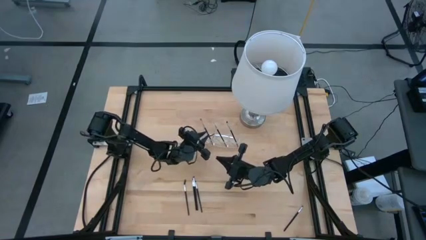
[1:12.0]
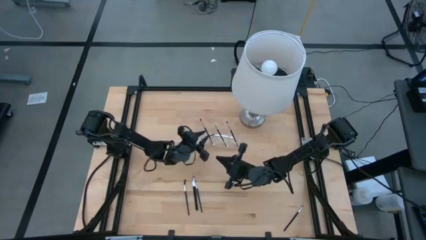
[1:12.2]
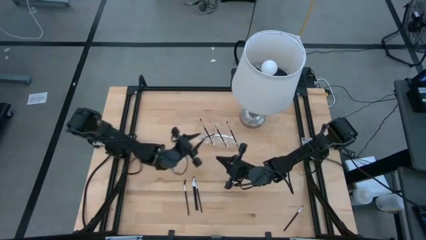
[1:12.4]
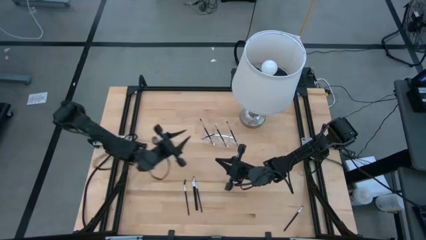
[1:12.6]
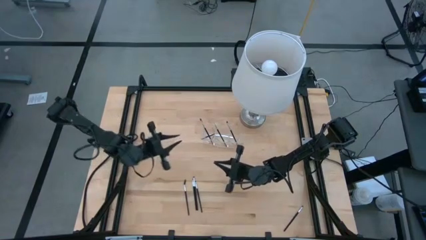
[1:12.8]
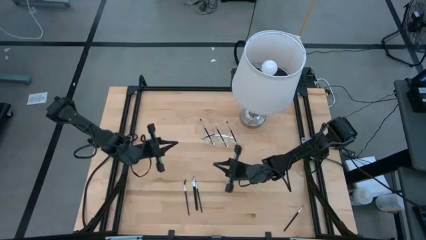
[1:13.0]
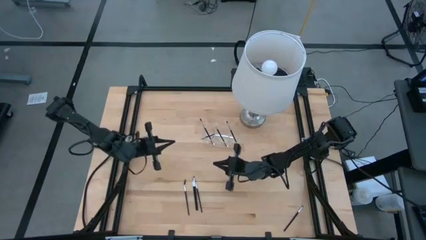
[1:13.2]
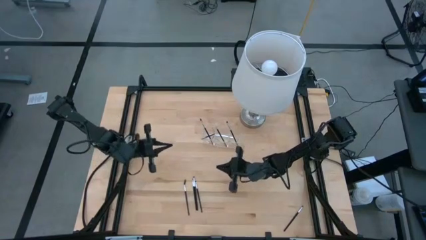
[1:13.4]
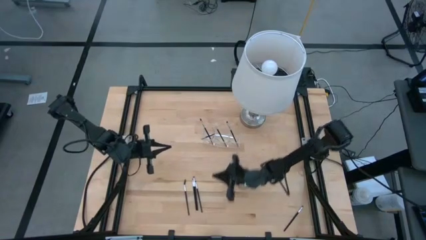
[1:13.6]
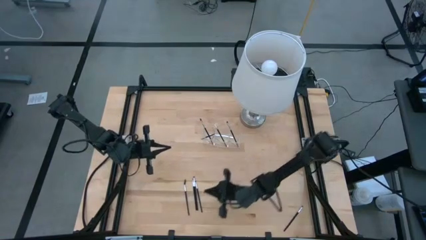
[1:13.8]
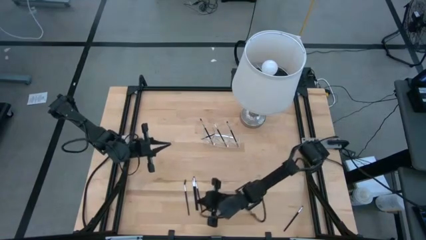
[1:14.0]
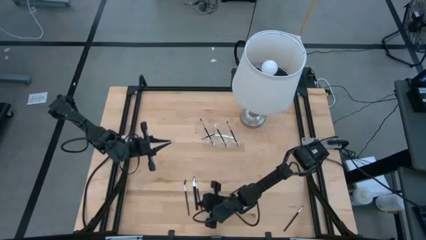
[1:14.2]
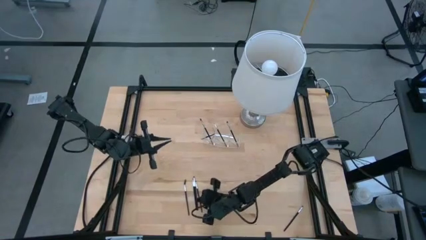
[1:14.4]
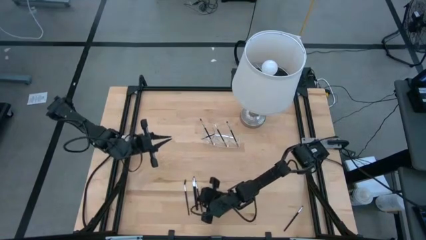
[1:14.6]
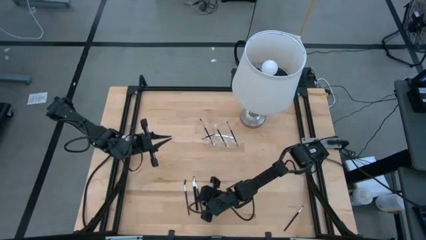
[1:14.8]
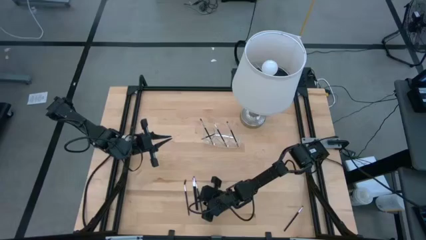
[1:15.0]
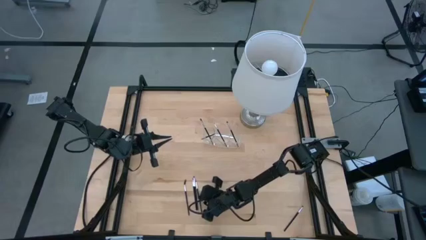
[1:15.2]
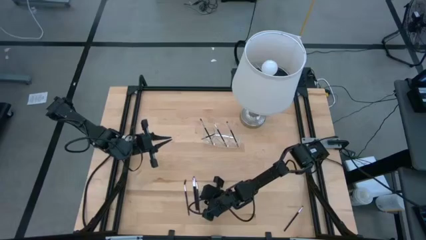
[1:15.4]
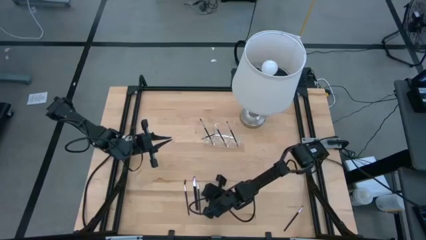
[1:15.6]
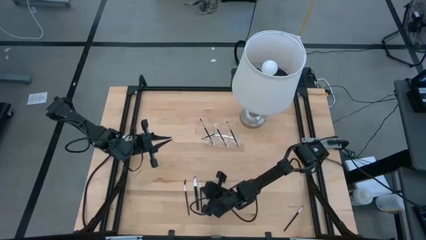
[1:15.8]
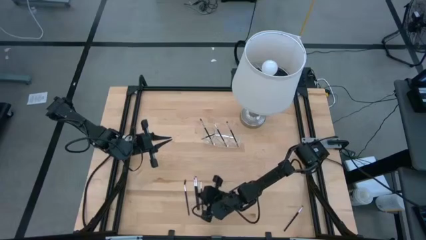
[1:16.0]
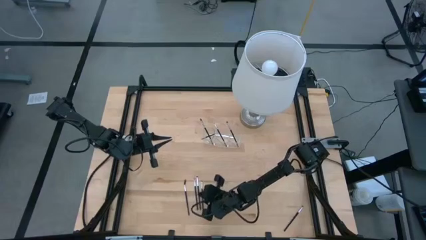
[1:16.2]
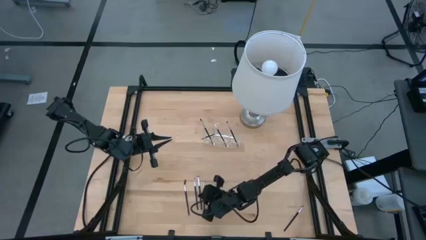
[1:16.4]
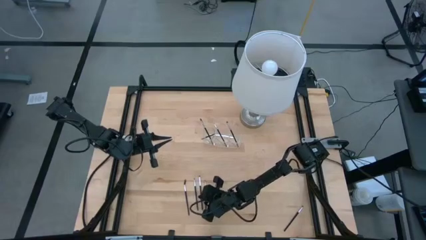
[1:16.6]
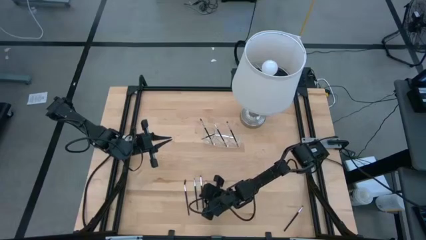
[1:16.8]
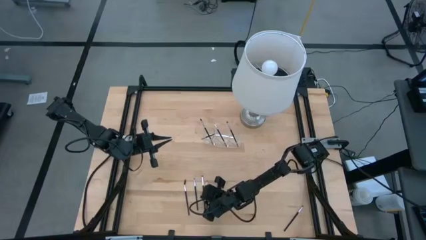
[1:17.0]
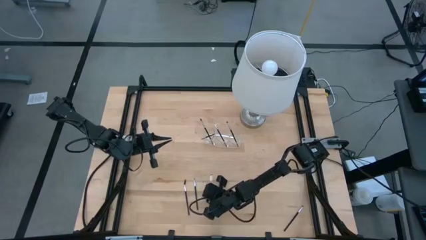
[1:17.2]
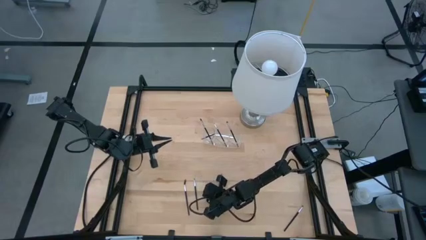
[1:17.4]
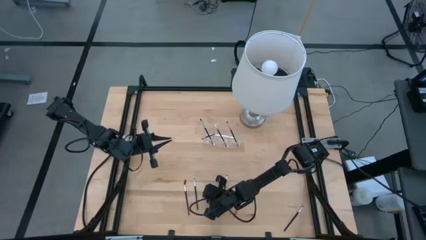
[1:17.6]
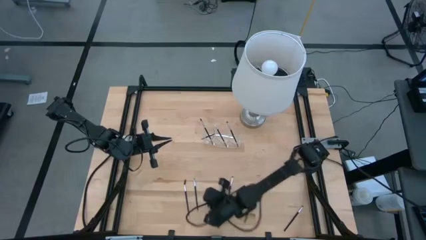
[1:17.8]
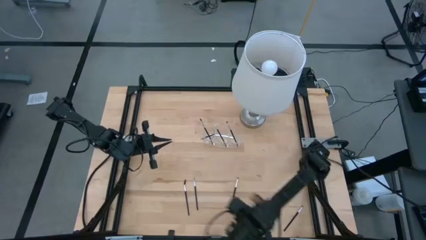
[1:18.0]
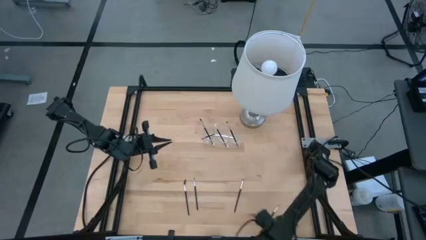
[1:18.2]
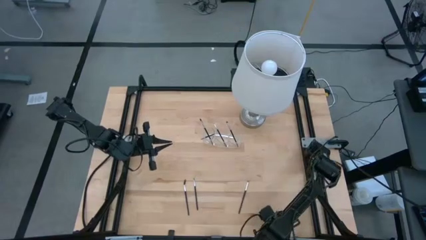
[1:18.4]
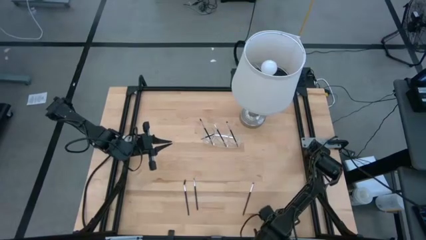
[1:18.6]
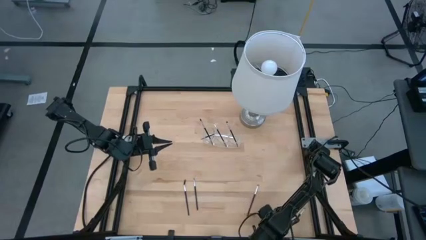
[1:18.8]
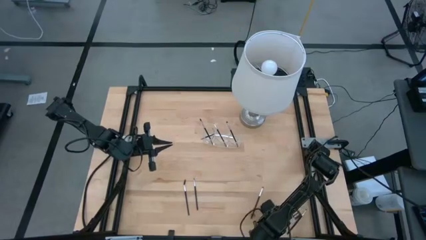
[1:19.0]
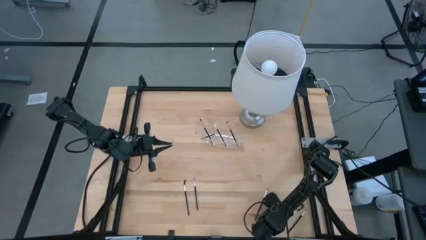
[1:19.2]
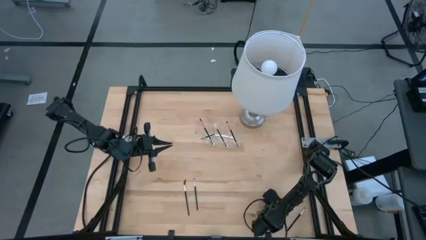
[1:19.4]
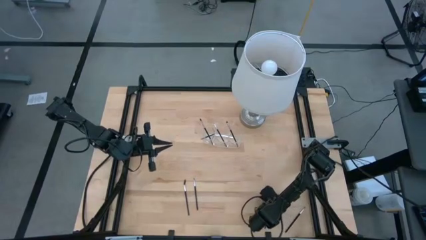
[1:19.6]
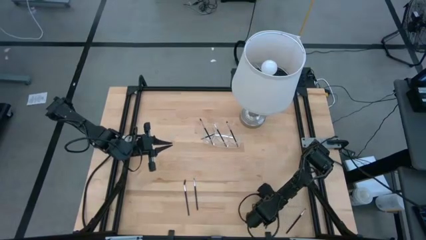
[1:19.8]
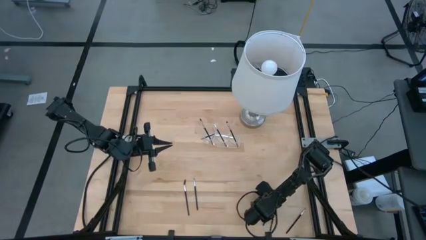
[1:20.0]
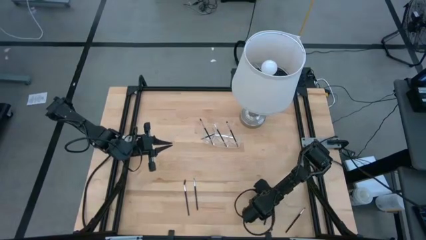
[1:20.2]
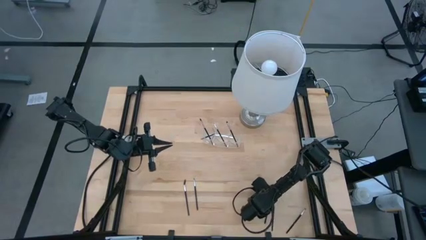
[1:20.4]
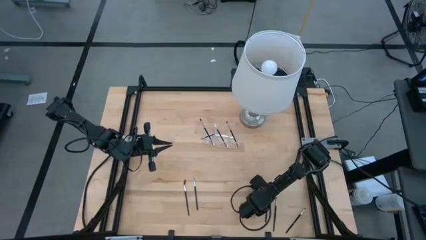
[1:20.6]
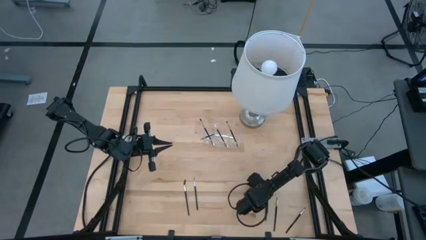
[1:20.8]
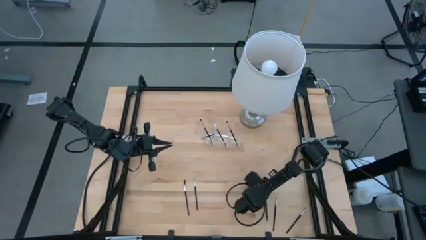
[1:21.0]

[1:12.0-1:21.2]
Task: Pick & Place Makeup Brushes
Move the black eyeshadow brushes to the bottom right of the table

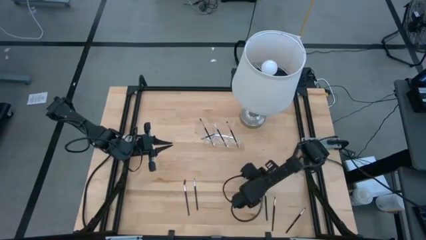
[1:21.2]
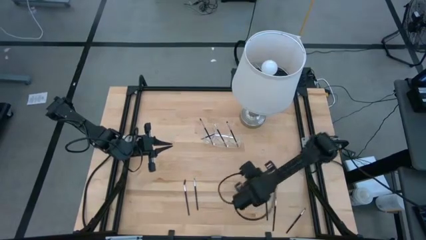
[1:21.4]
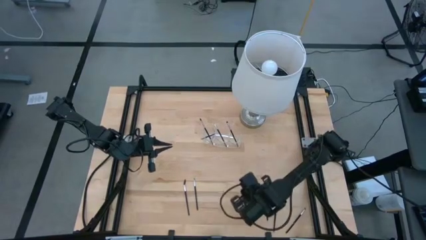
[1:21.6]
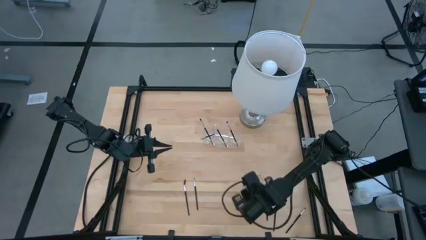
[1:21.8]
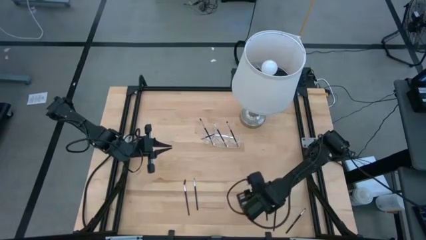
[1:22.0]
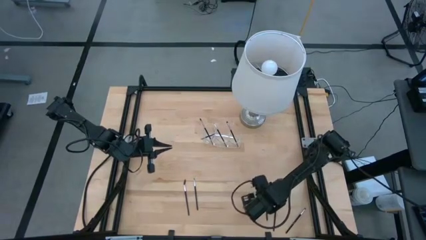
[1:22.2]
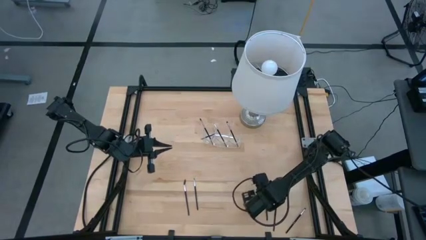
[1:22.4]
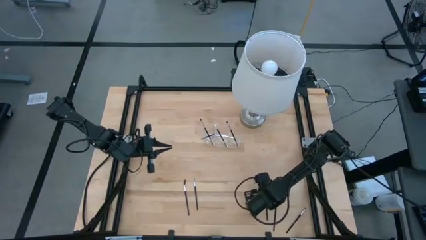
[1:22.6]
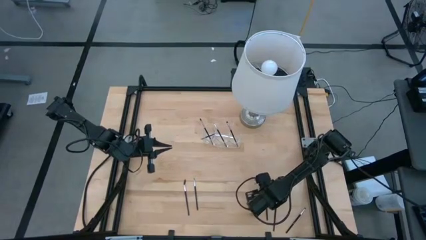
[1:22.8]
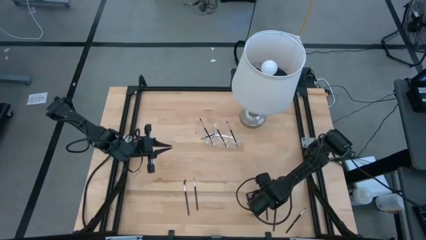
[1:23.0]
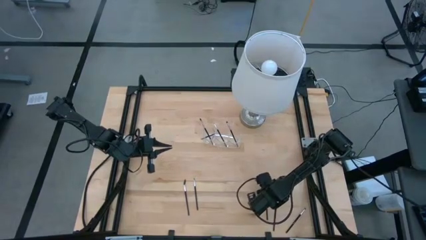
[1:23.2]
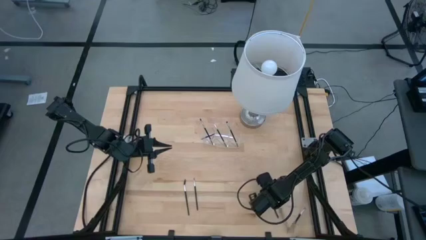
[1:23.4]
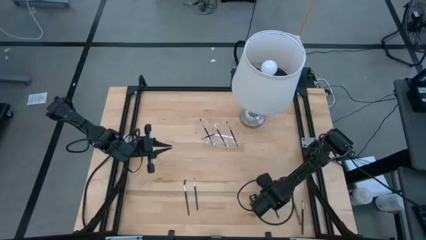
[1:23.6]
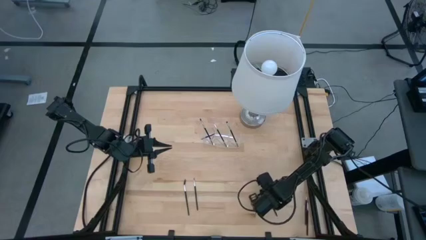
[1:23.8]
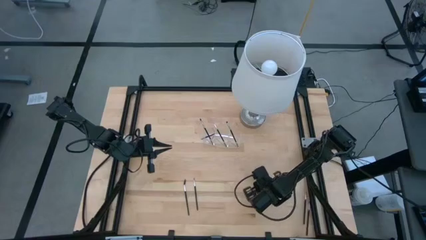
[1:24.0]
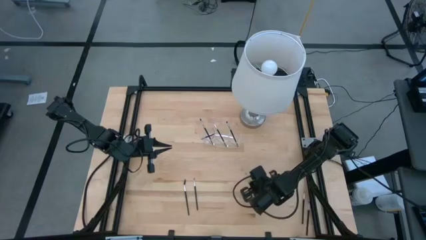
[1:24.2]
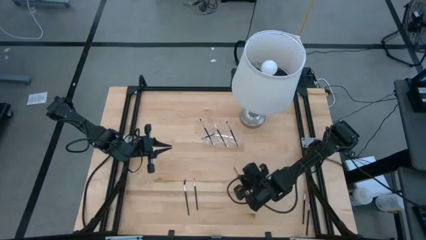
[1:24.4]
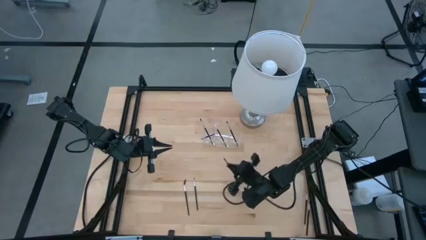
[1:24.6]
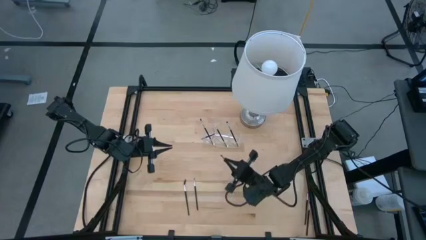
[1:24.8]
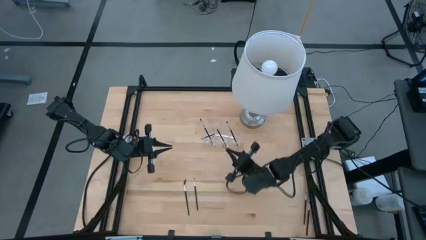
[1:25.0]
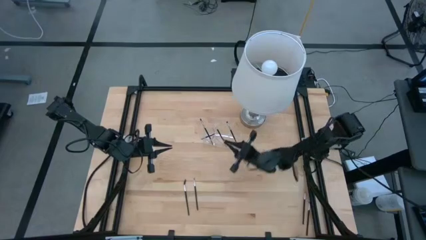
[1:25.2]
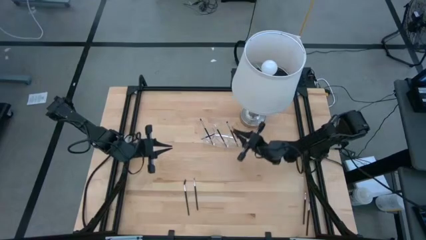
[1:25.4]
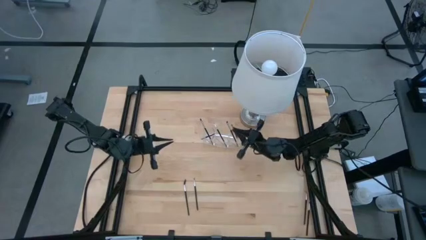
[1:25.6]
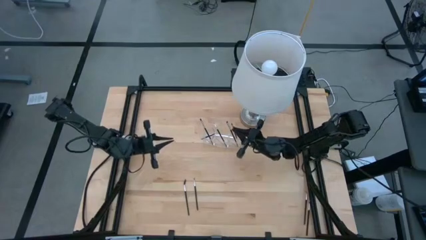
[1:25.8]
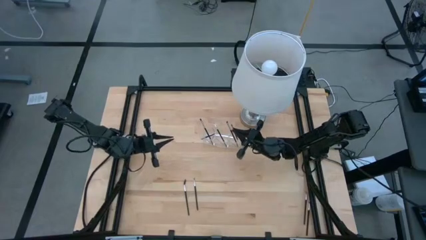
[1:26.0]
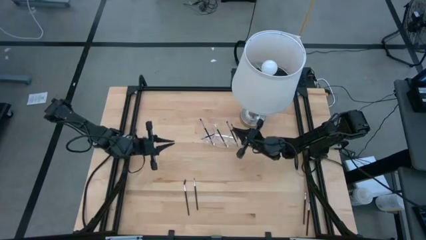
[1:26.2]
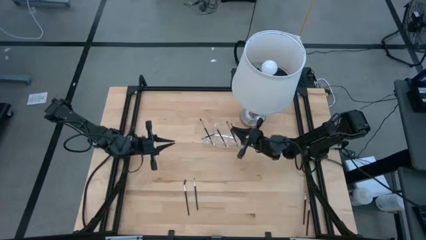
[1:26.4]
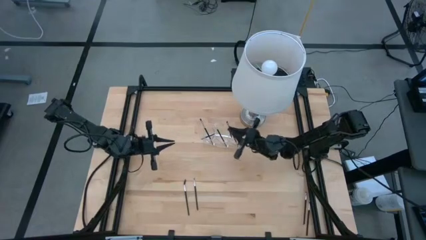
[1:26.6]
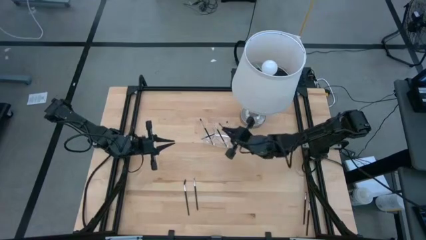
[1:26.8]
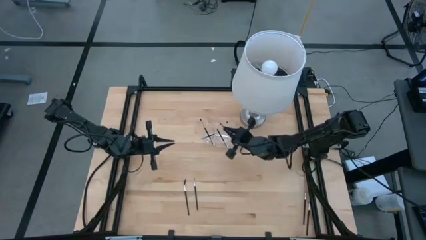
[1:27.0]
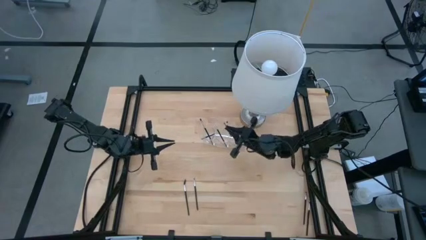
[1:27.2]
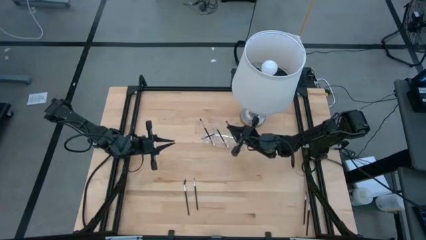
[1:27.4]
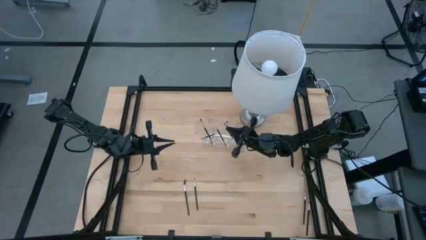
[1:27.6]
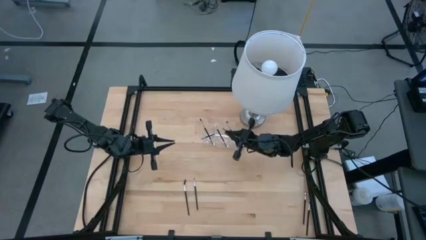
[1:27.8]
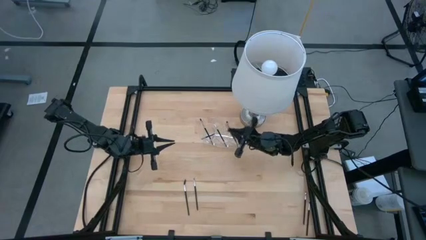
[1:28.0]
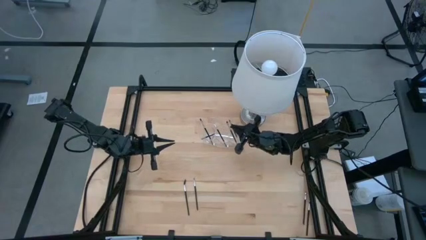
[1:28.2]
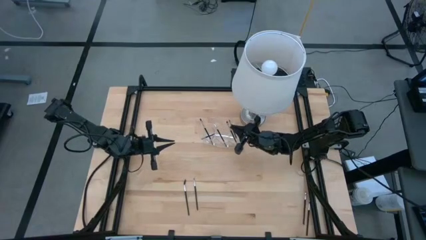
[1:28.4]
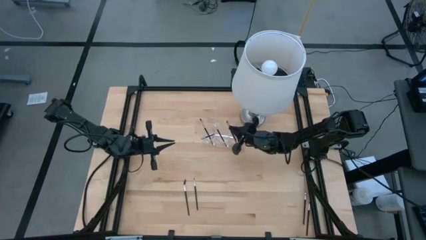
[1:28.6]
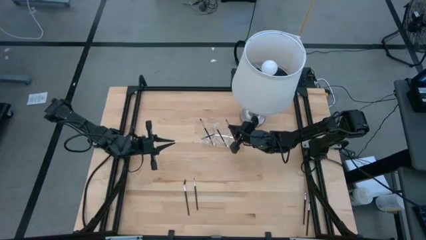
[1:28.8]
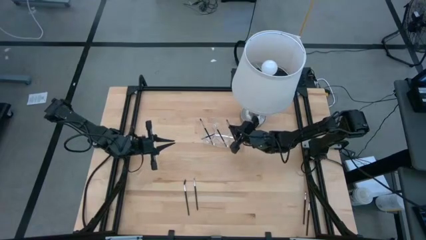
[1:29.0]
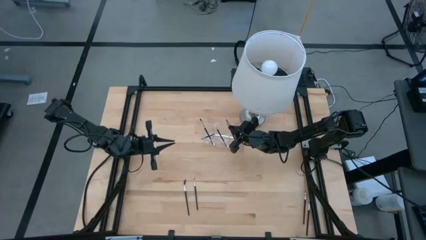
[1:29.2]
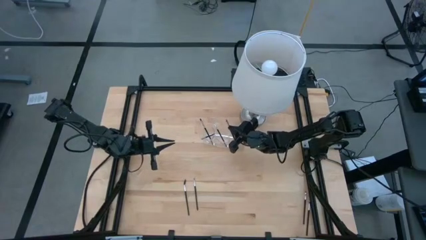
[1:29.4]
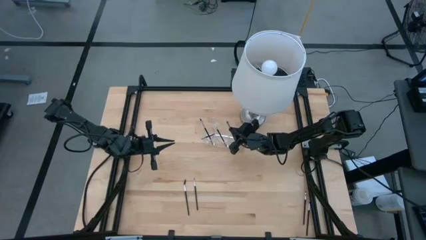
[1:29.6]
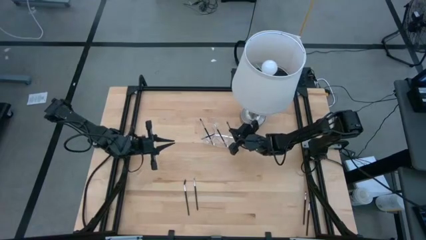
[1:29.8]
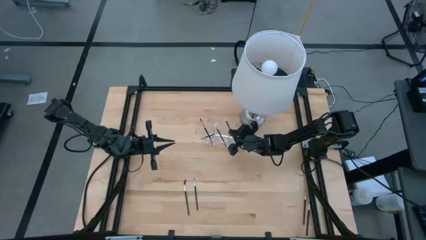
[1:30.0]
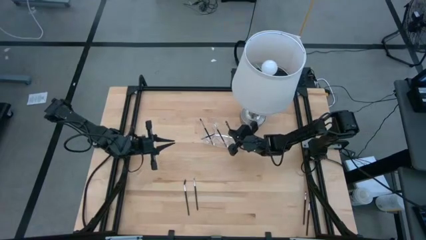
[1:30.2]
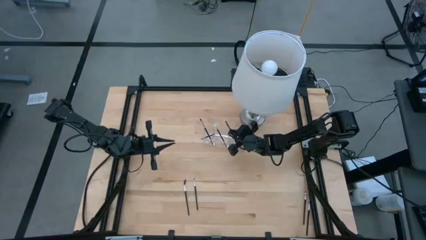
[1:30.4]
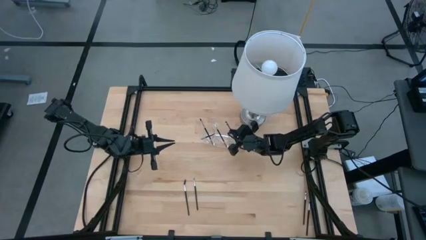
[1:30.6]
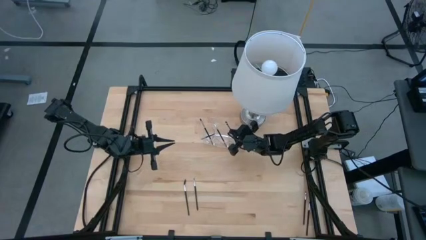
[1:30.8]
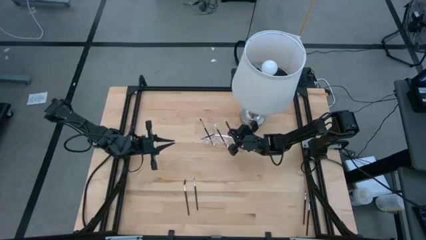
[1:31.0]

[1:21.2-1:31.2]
Put the black eyeshadow brush into the transparent organizer
